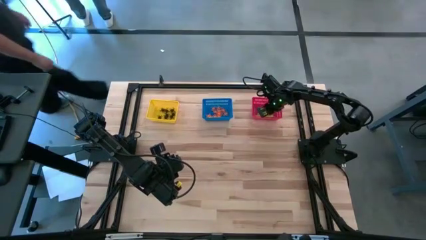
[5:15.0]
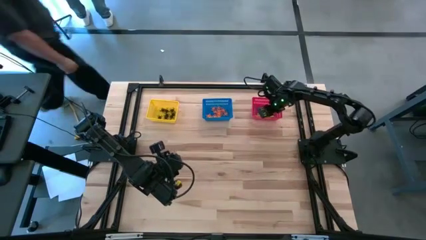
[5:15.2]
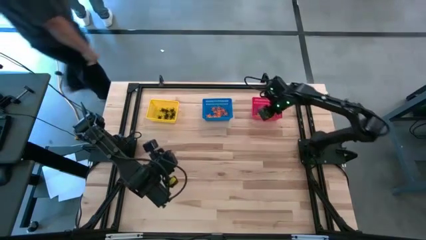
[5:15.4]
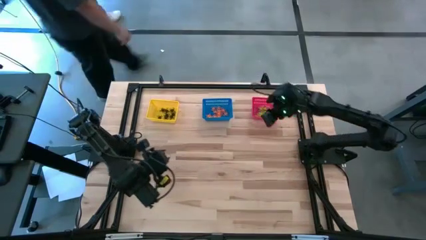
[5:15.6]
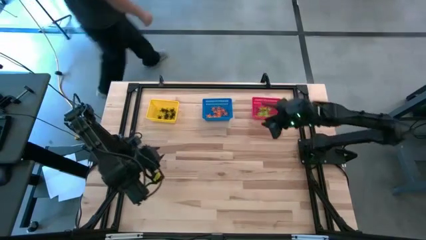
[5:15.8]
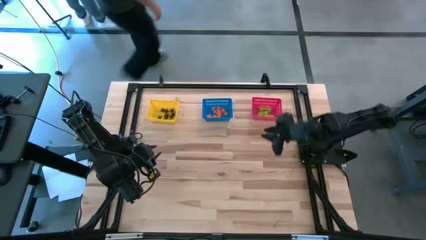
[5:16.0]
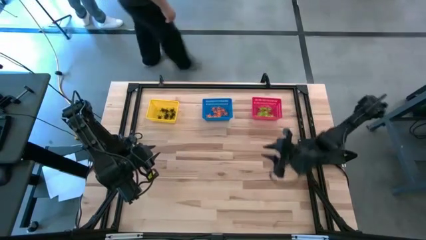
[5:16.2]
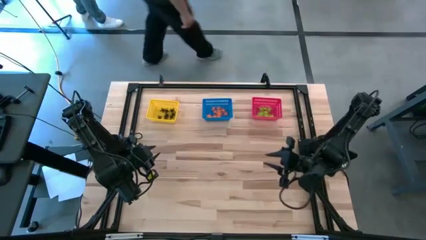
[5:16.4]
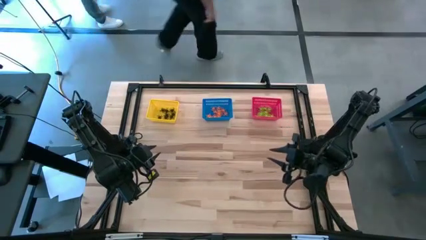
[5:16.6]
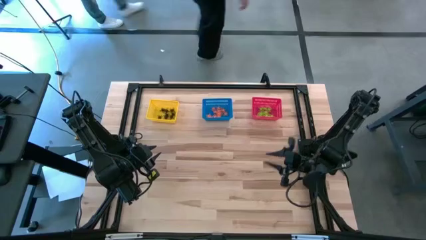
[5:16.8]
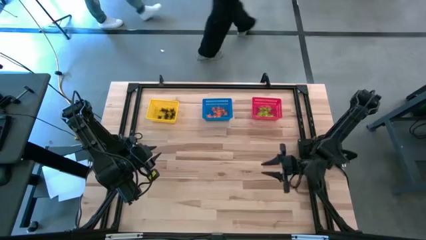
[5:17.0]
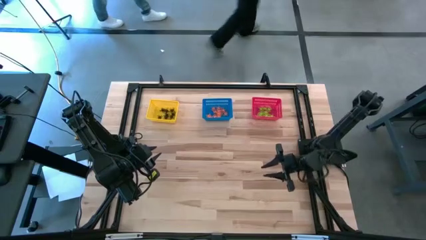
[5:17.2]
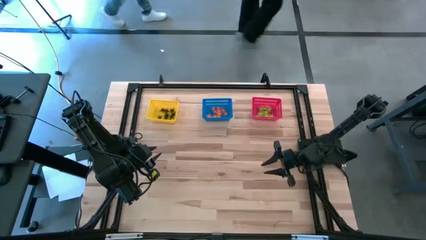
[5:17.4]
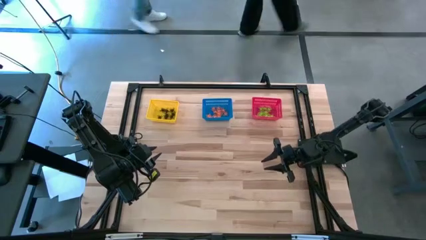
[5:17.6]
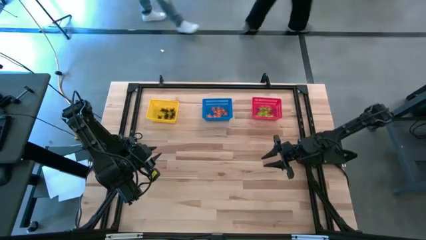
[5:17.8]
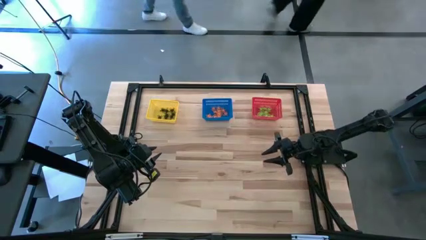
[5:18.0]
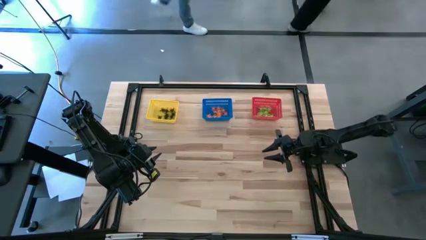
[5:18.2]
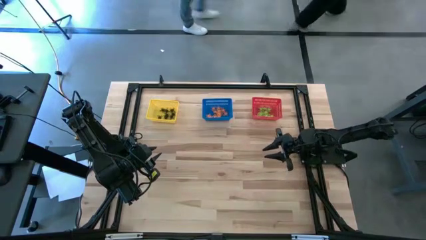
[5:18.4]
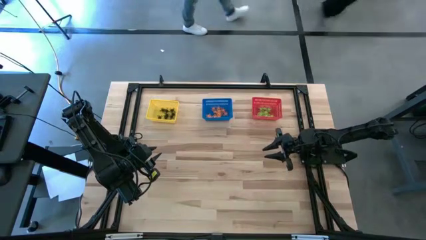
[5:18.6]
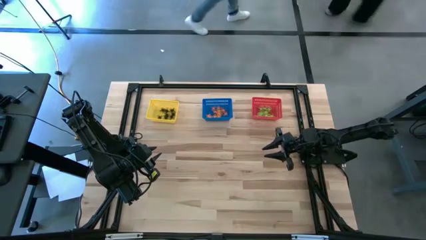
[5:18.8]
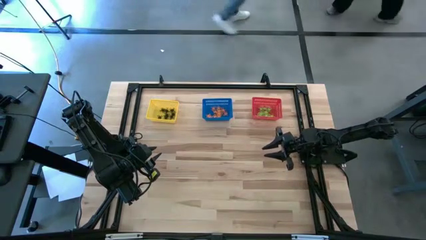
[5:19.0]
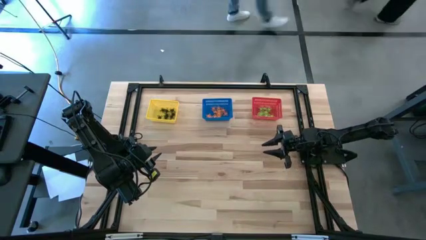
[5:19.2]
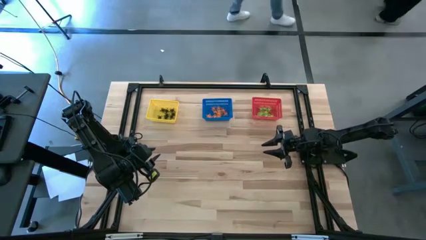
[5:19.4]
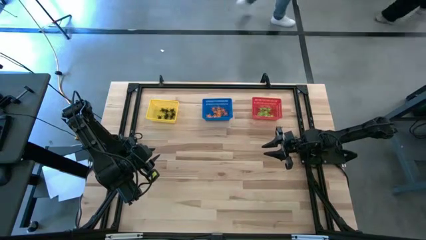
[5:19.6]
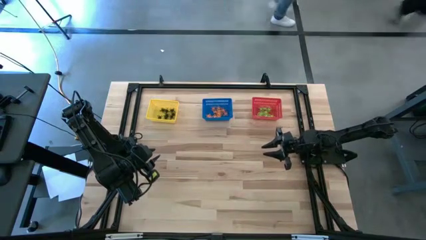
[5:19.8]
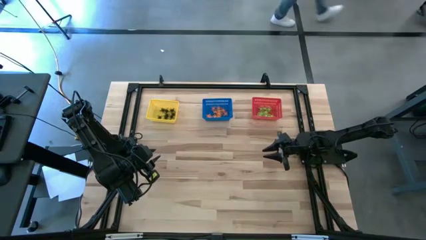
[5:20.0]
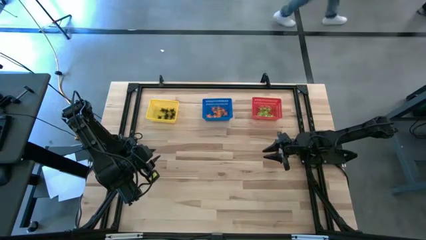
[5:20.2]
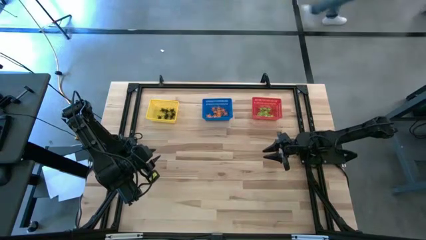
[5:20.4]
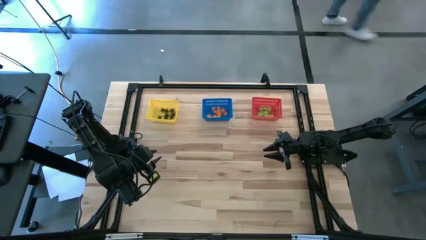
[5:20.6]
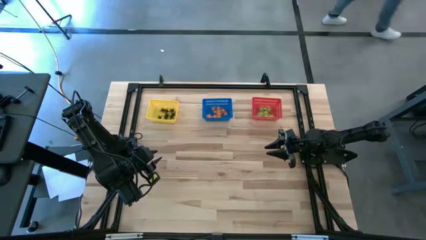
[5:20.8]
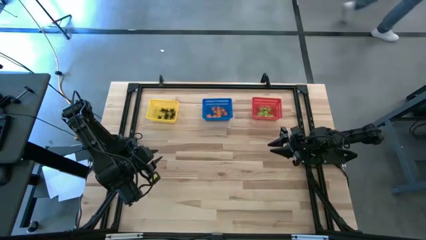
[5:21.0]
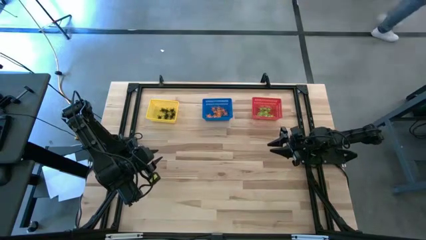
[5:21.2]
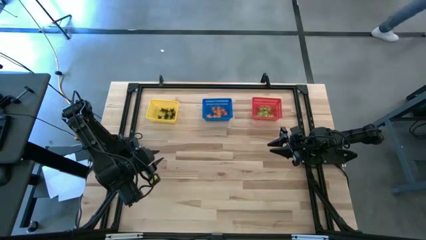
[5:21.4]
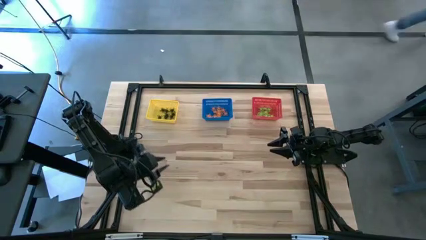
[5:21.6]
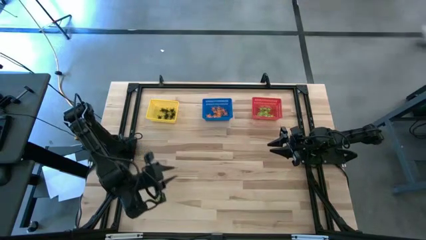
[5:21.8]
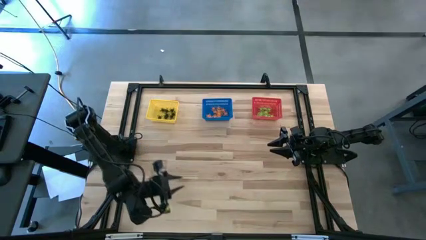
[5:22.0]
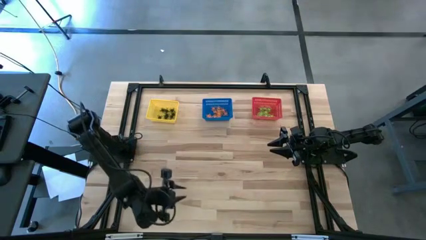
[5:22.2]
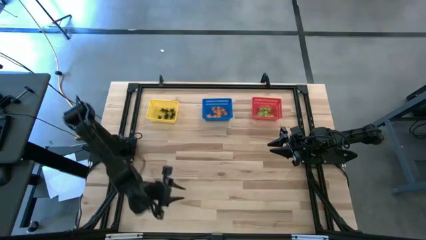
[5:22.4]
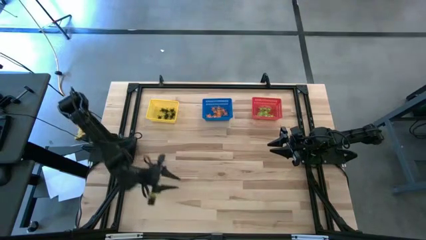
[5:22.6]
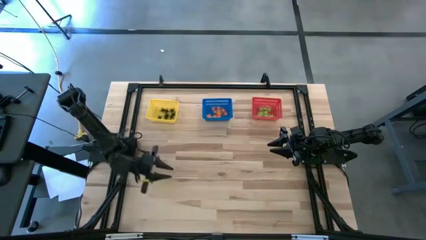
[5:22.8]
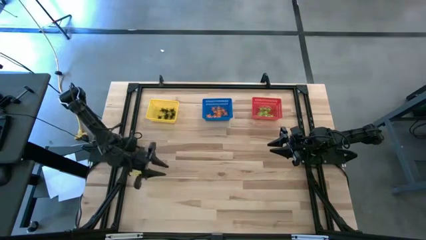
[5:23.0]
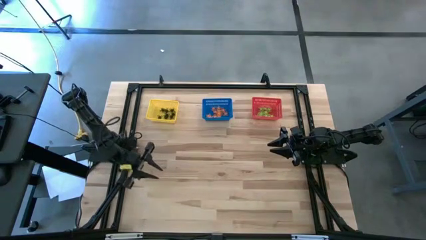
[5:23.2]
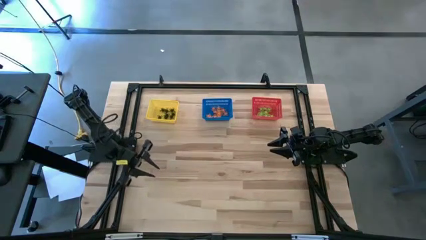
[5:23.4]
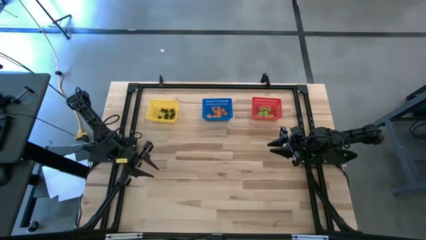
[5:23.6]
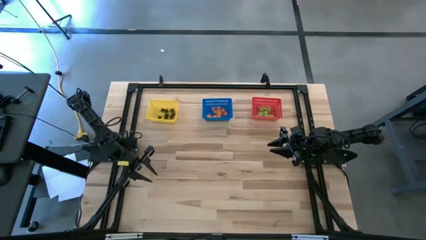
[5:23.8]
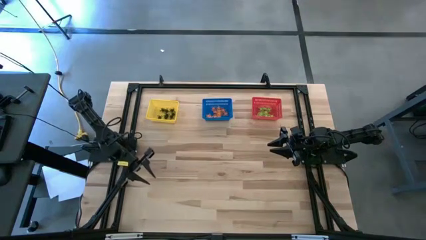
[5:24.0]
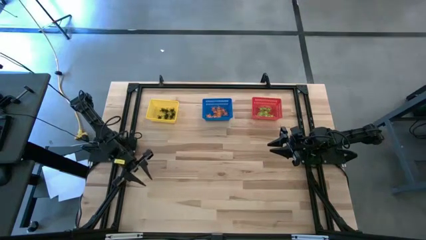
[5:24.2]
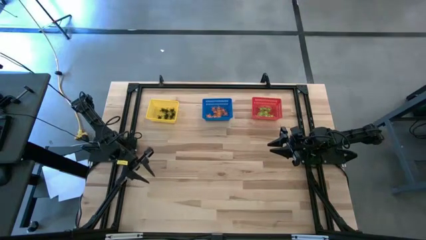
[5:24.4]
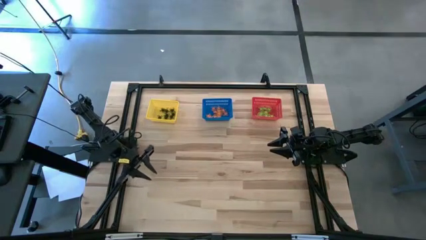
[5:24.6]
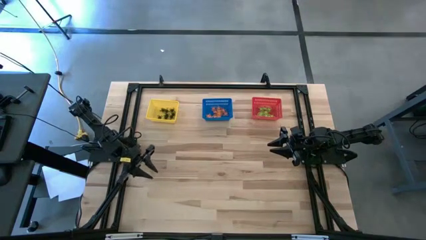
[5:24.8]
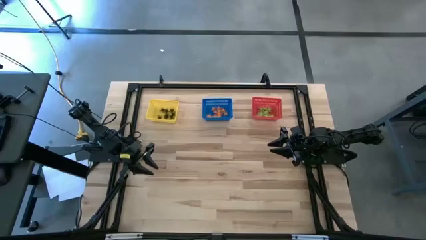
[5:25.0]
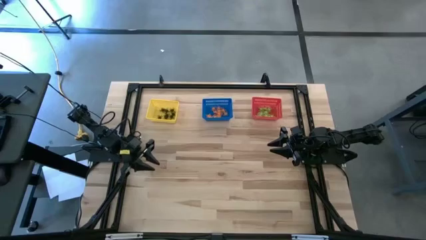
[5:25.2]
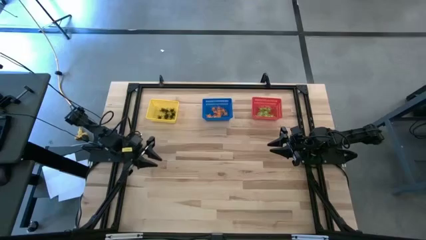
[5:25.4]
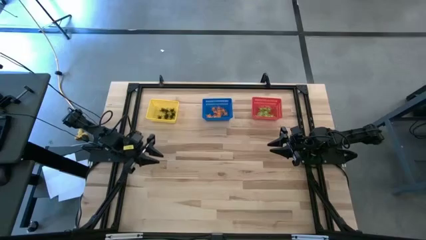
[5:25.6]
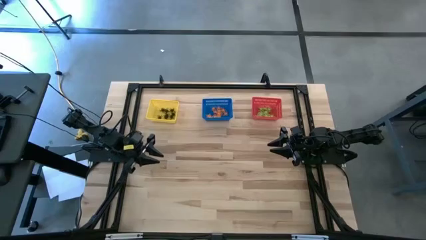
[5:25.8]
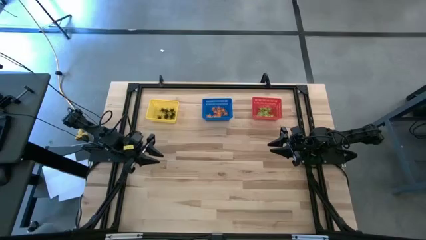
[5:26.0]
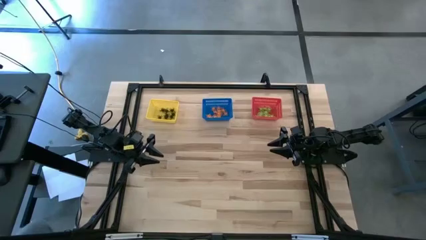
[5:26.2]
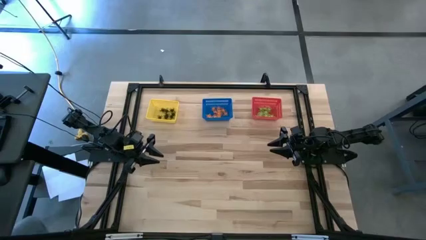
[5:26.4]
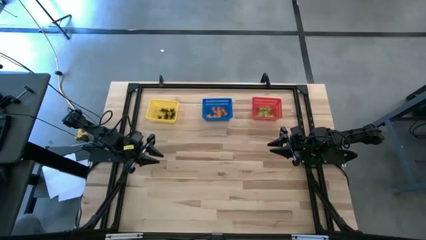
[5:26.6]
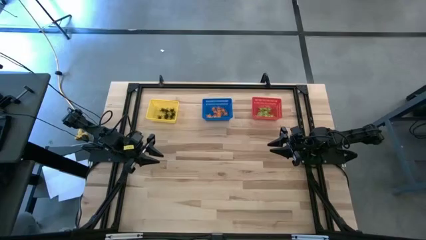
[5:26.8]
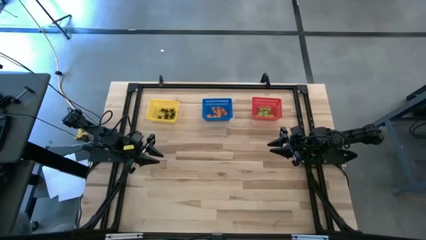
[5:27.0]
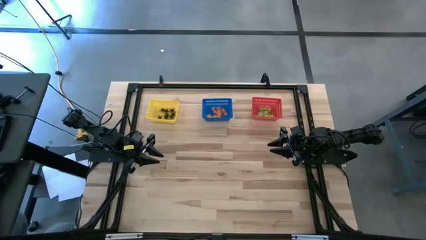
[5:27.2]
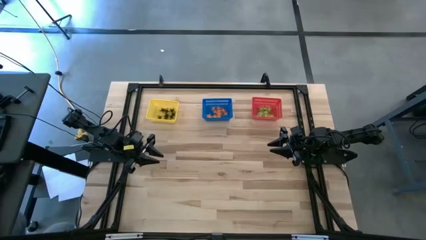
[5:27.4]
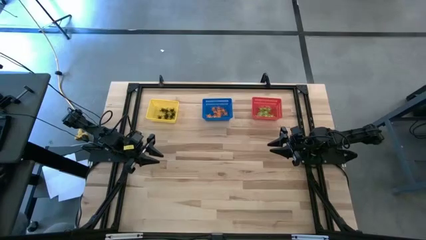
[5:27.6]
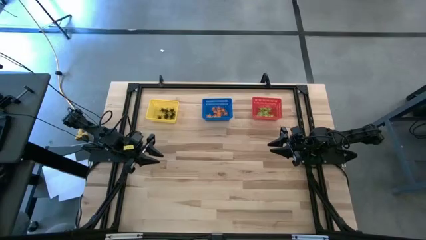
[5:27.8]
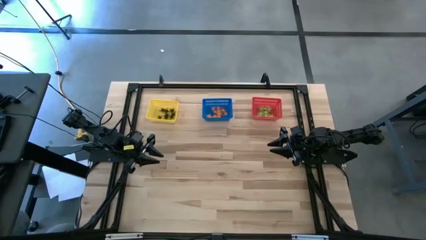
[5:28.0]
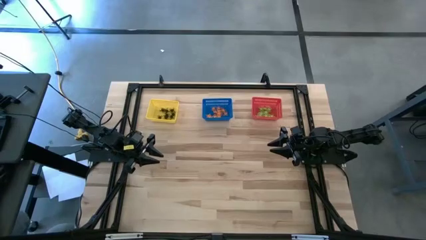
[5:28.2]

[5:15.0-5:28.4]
Task: Sort Halloween decoration
Return to Home Position
